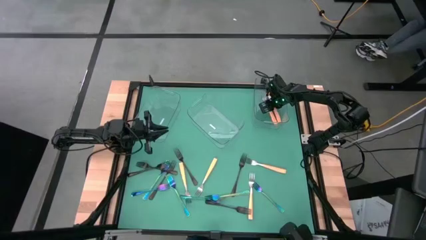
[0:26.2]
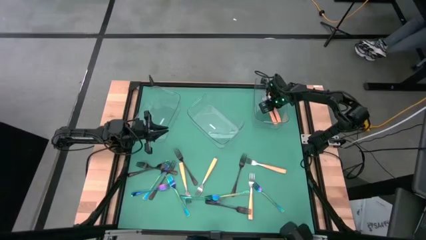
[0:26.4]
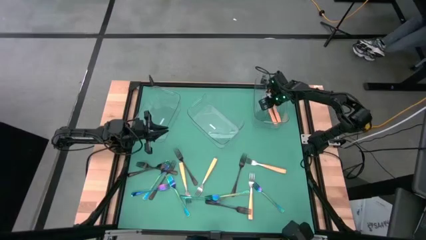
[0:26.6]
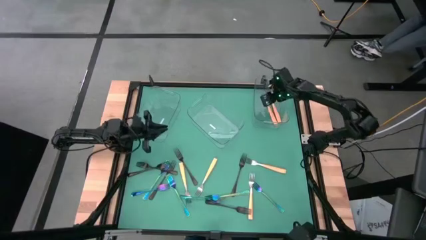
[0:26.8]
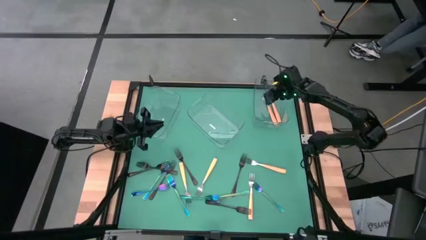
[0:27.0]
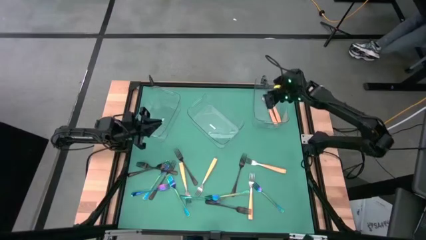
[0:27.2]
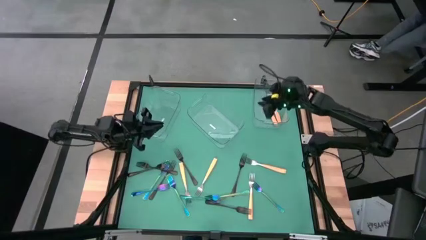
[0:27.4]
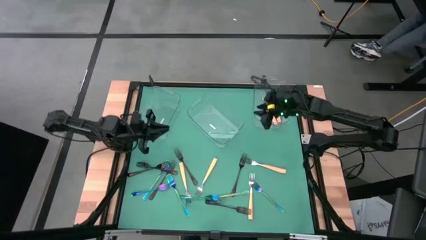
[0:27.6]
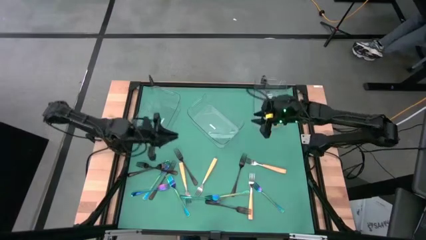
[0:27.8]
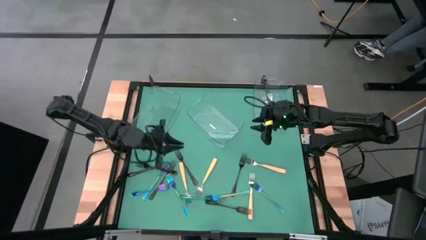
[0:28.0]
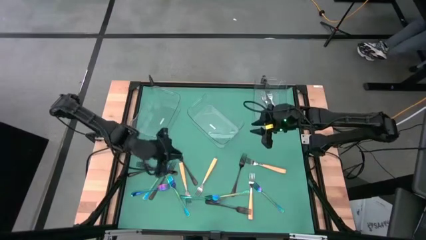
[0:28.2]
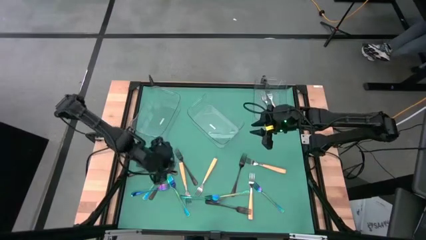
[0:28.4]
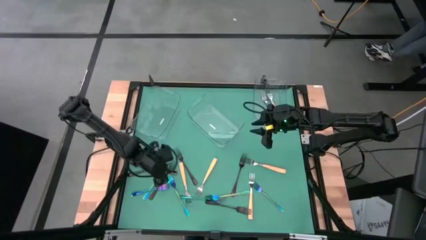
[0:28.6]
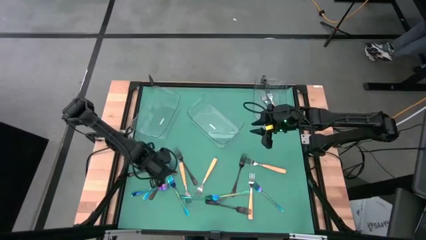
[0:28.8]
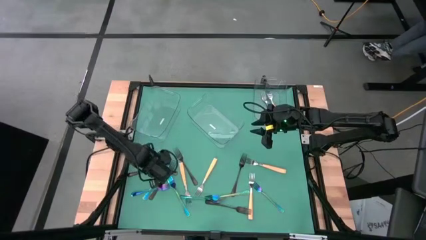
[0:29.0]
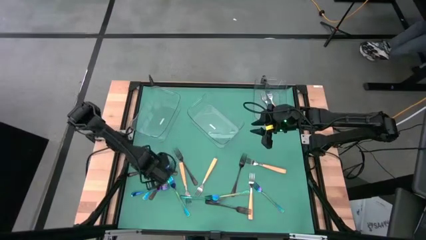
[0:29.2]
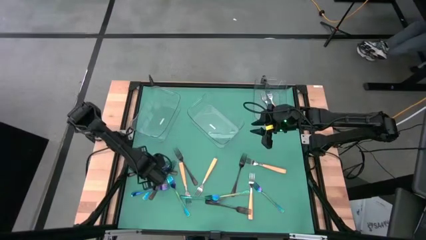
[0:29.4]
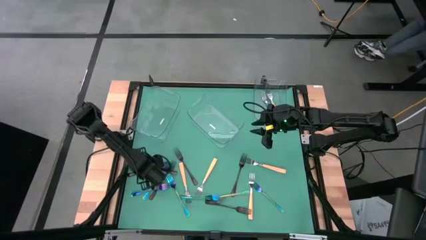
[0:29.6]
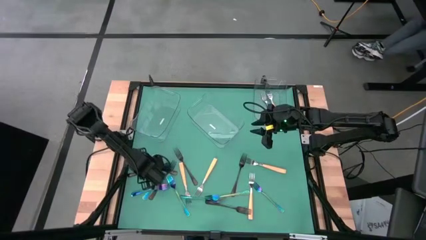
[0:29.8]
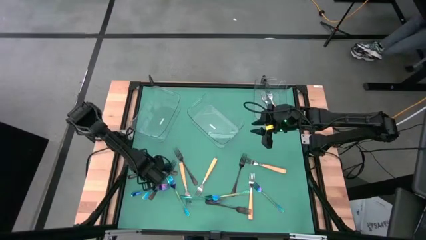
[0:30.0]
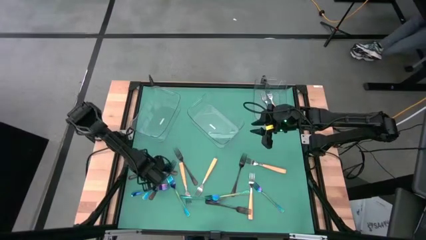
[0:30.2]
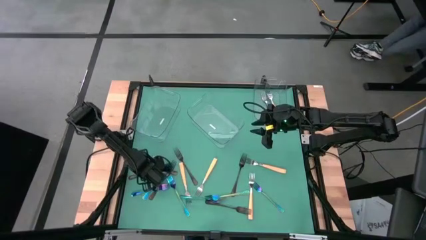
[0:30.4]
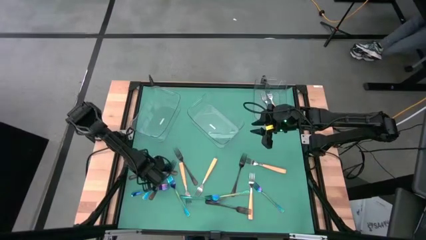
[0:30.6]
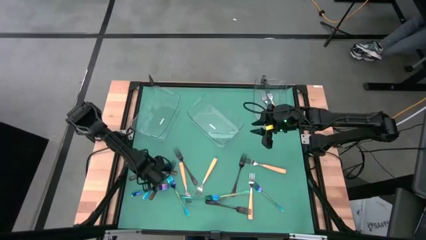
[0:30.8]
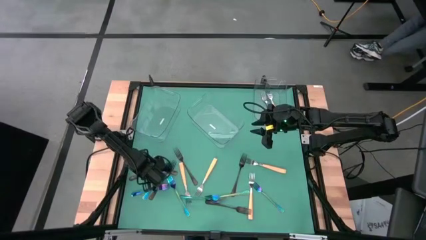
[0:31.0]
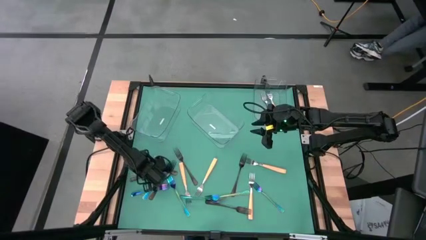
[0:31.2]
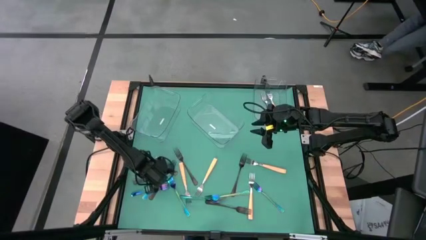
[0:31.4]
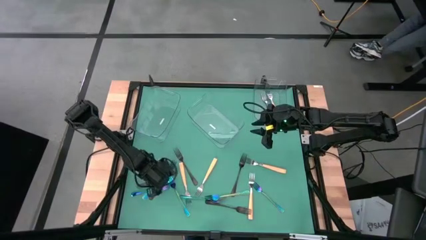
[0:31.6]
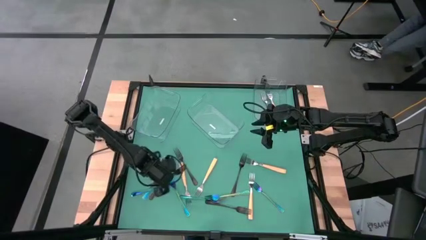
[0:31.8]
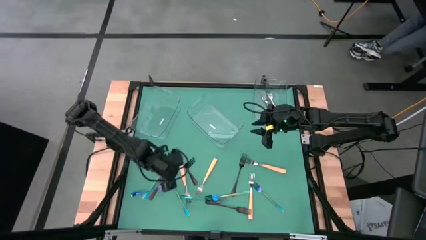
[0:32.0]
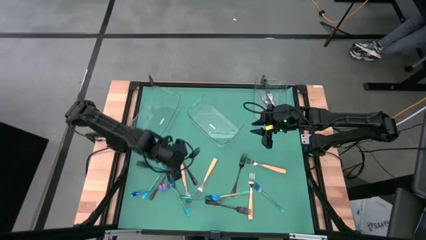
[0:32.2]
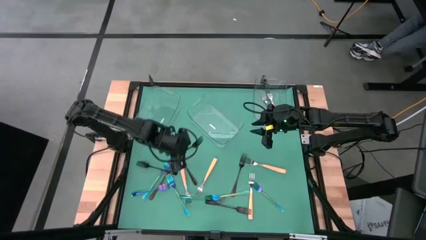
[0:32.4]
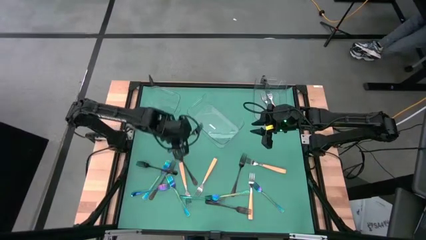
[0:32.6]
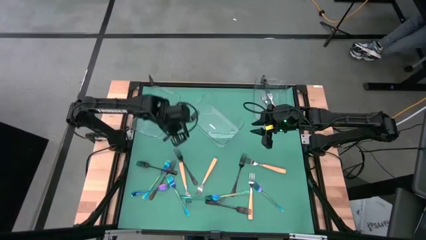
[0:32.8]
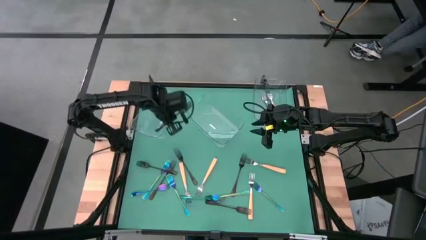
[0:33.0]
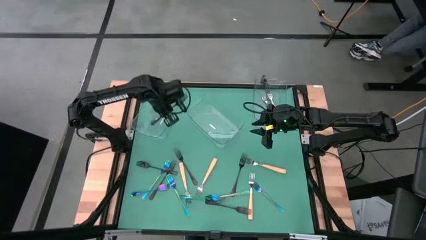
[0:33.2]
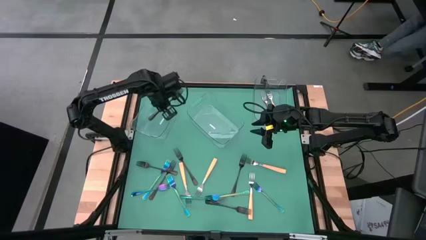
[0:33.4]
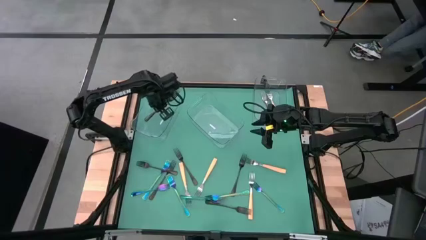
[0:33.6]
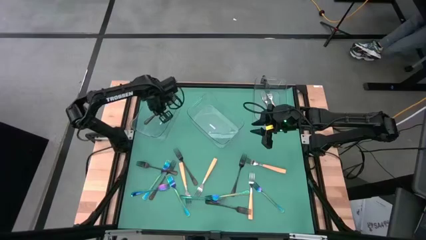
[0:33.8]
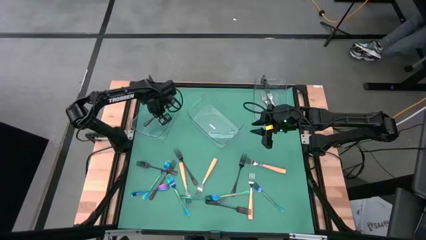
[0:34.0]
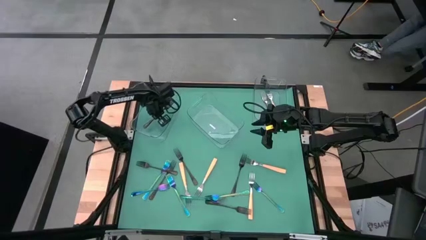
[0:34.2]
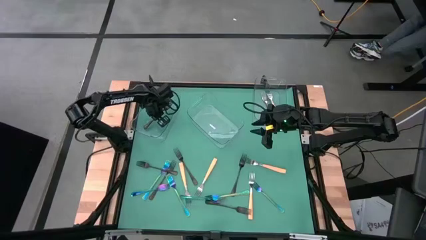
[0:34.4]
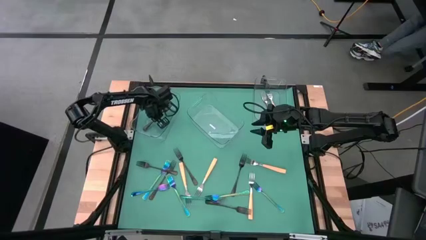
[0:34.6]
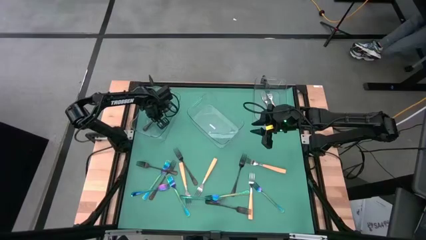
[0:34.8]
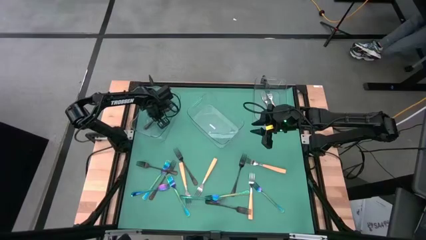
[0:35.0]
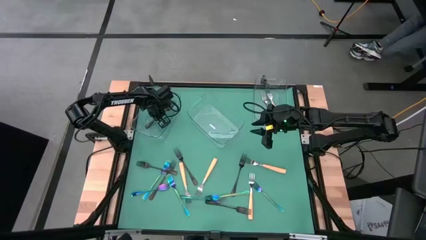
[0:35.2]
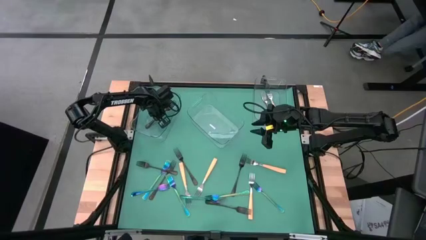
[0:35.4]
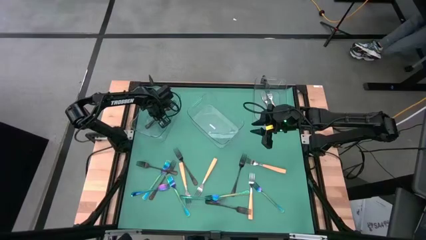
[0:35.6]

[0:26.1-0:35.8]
Task: Sort silverware by color (type)
Put the black fork into the left transparent bin

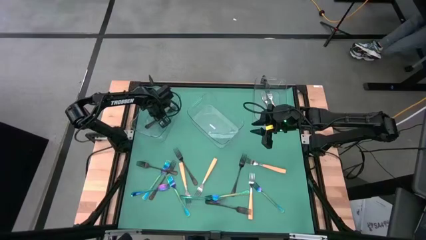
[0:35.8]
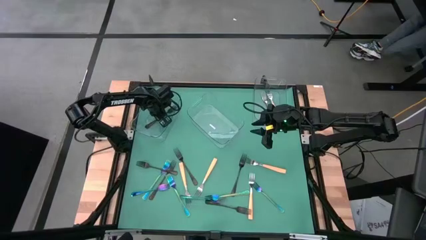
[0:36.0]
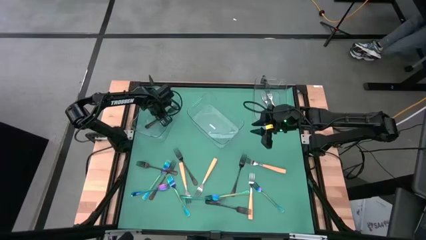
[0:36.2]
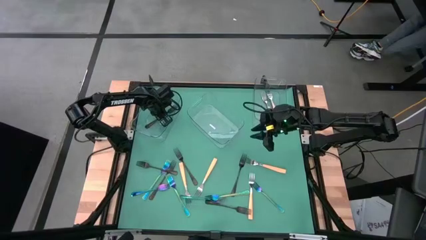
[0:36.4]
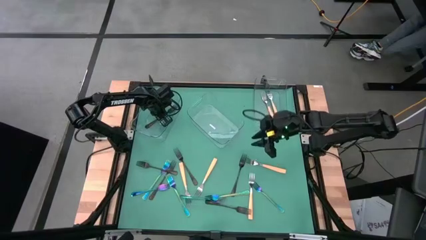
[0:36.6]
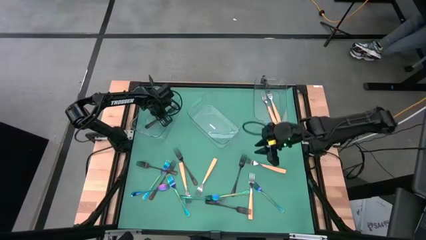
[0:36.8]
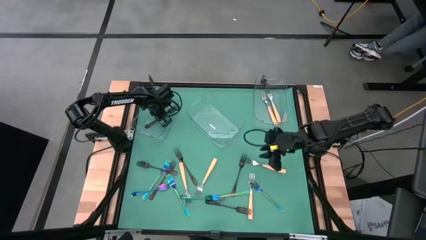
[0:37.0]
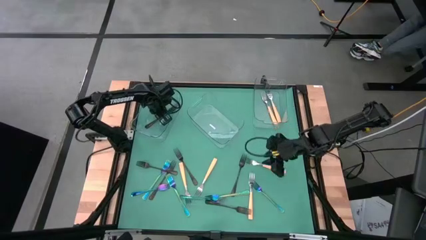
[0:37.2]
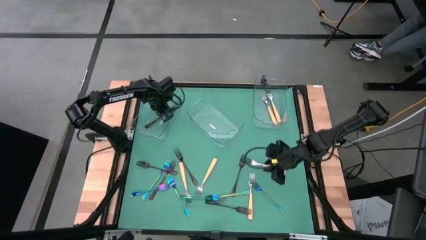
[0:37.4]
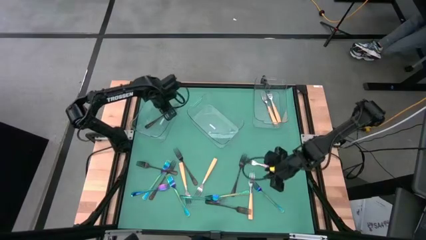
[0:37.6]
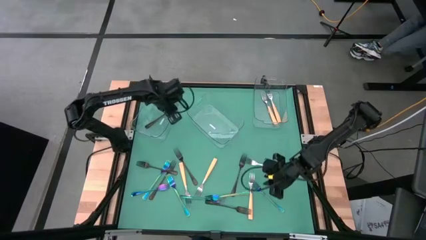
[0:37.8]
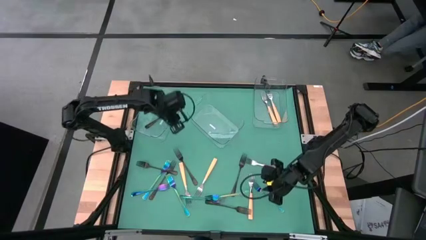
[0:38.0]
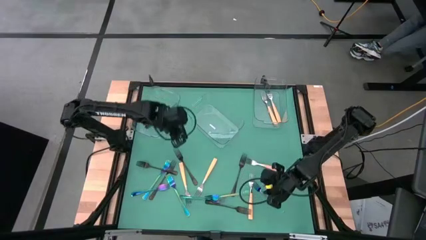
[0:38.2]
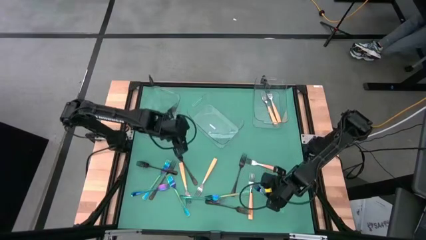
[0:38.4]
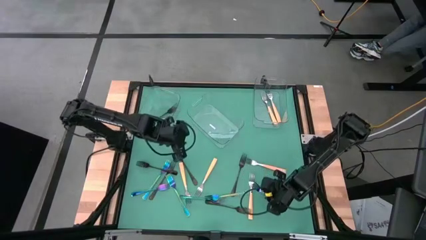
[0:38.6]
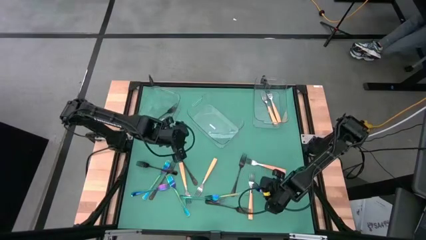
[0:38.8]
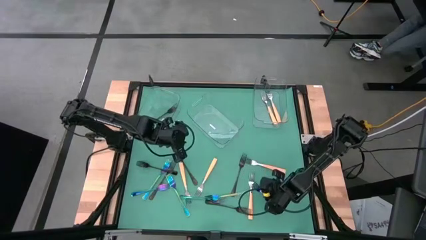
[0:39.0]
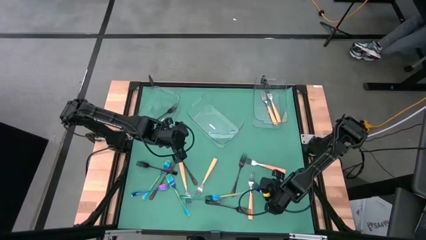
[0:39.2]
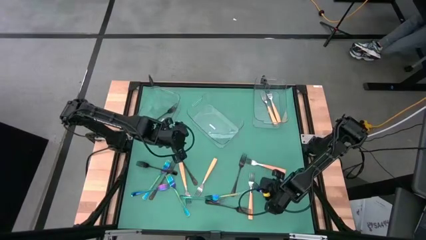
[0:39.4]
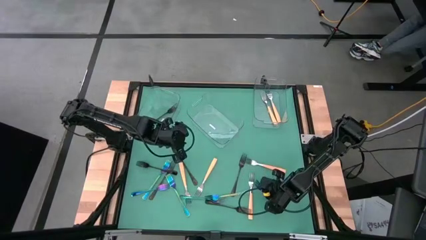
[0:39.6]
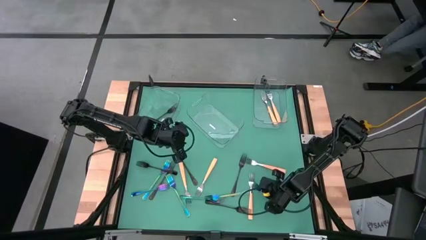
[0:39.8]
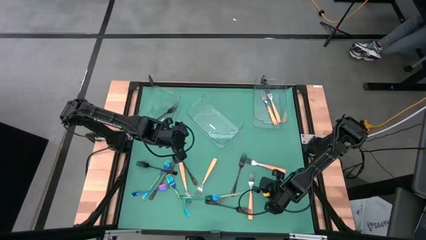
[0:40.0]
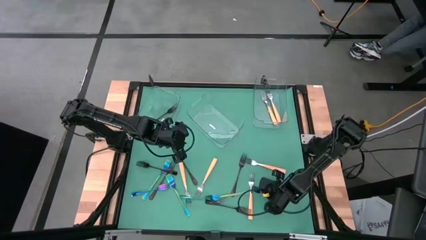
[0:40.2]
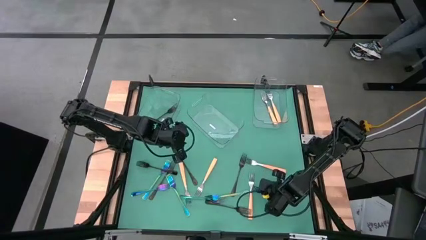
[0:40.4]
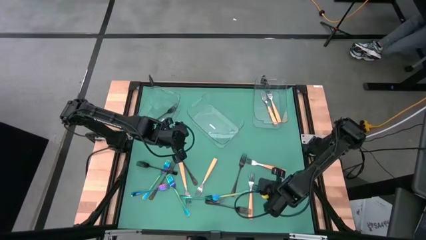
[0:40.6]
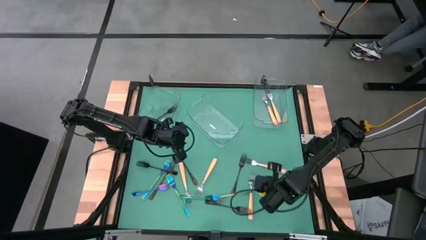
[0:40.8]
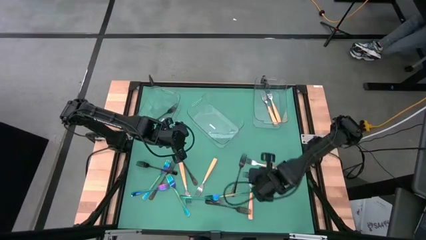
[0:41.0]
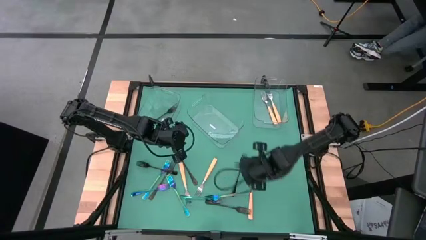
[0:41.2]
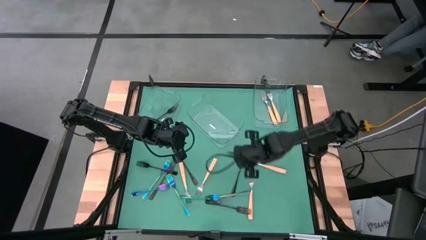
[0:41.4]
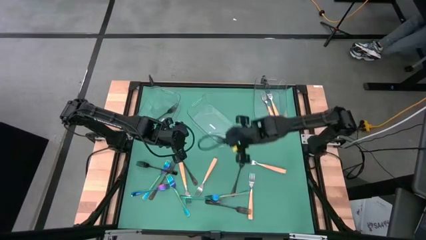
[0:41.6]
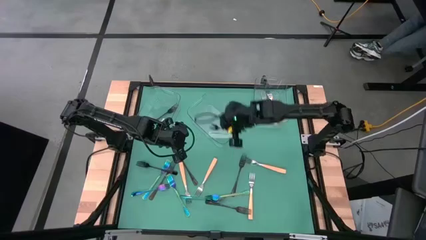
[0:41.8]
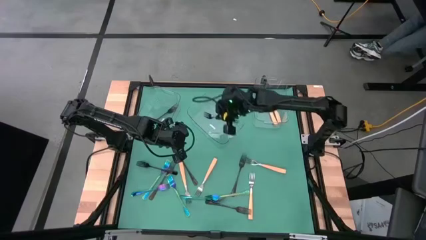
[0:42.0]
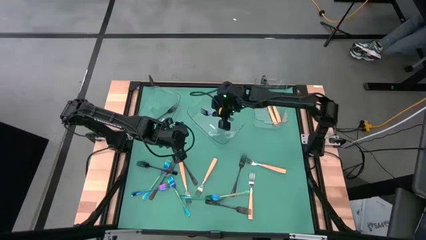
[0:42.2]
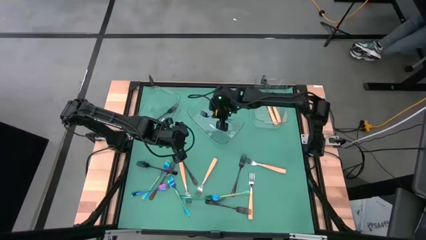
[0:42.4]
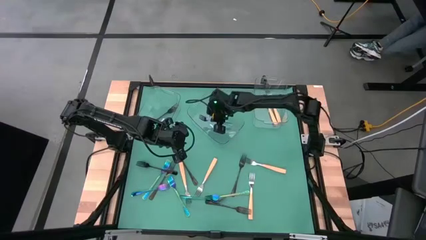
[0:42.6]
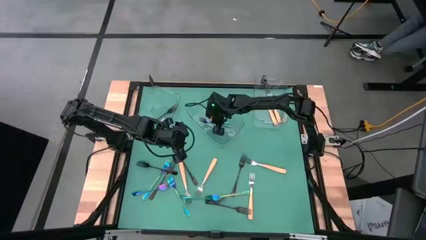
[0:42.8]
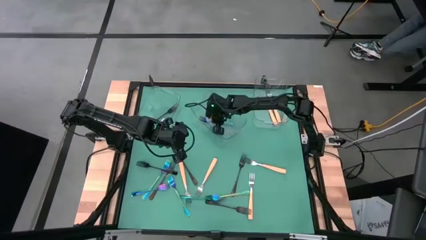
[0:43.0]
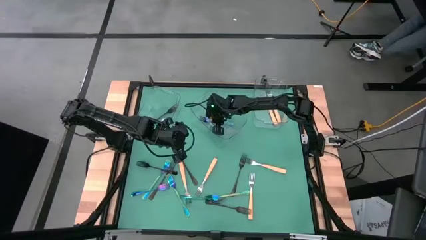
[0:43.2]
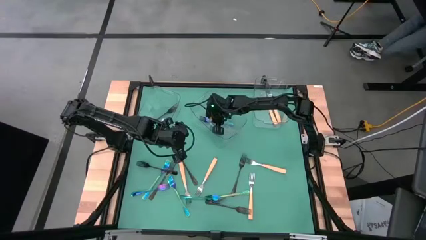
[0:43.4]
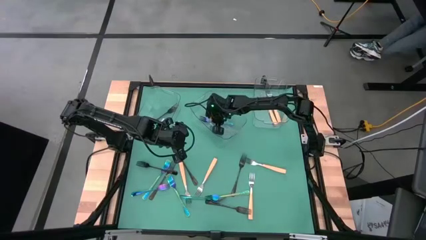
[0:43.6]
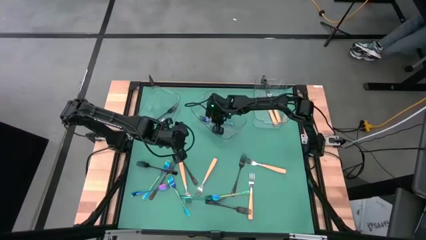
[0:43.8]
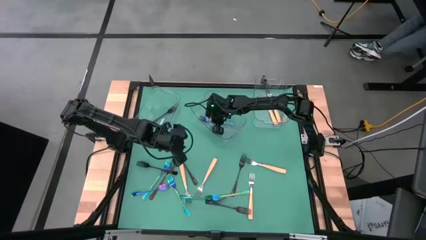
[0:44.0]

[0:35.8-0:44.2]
Put the blue fork into the center transparent bin
